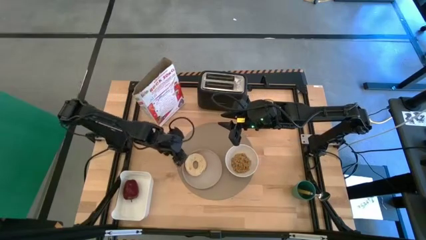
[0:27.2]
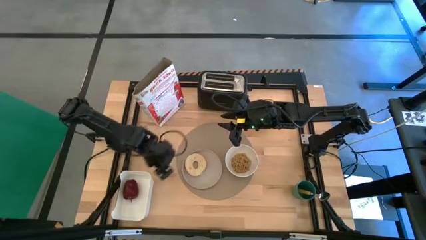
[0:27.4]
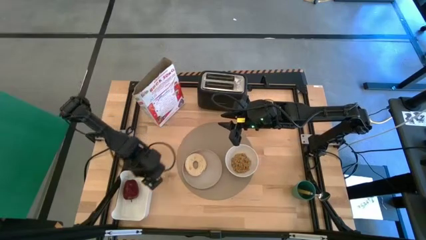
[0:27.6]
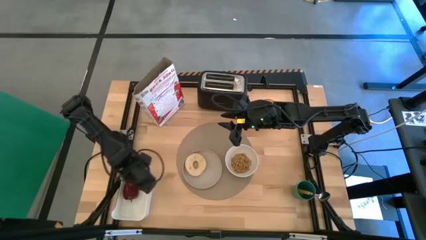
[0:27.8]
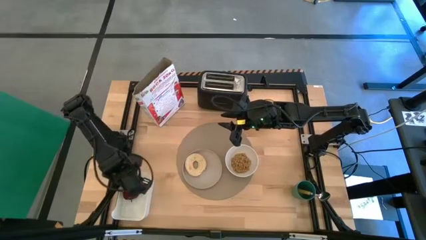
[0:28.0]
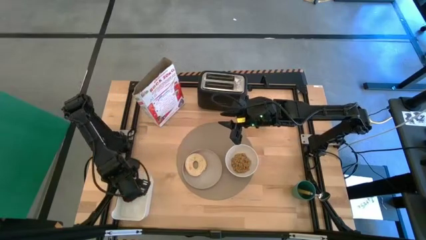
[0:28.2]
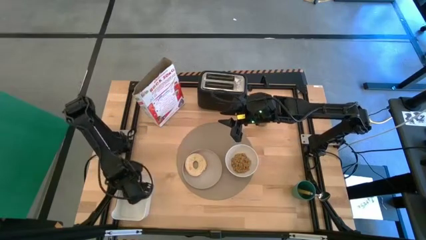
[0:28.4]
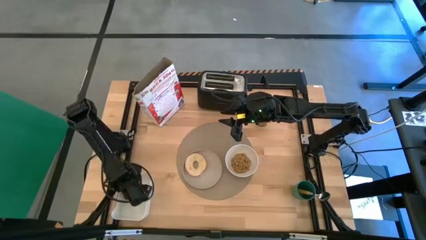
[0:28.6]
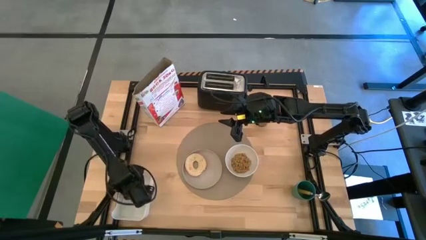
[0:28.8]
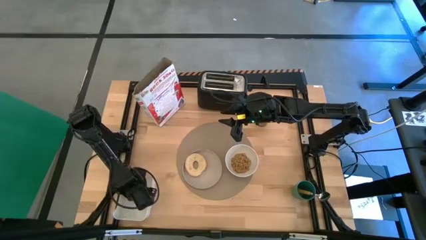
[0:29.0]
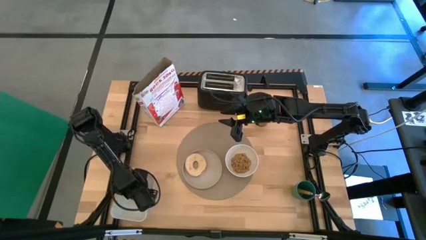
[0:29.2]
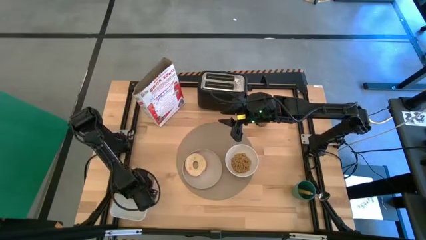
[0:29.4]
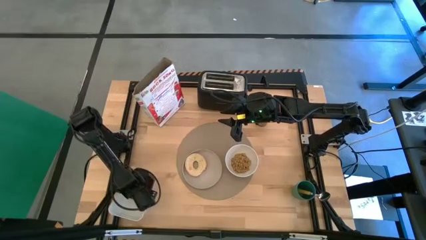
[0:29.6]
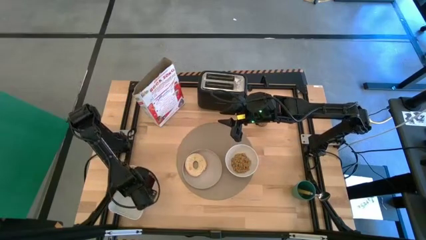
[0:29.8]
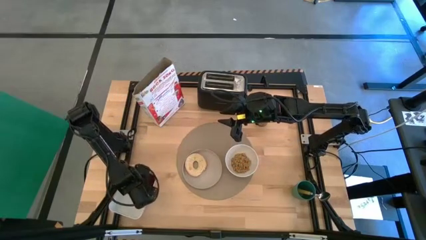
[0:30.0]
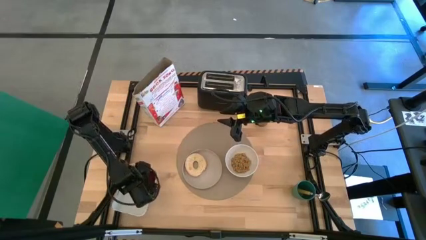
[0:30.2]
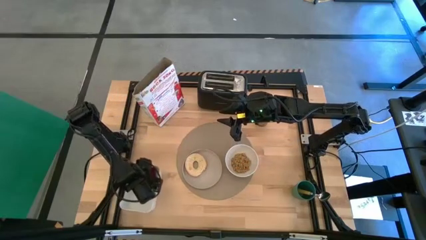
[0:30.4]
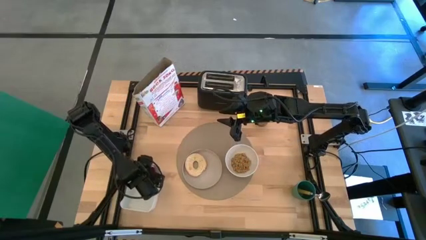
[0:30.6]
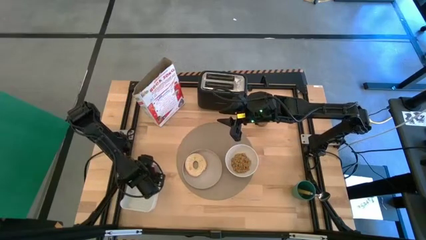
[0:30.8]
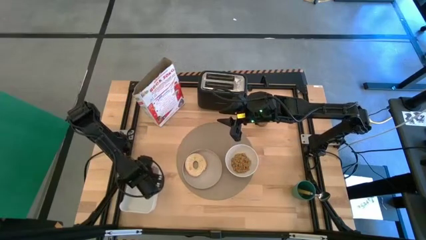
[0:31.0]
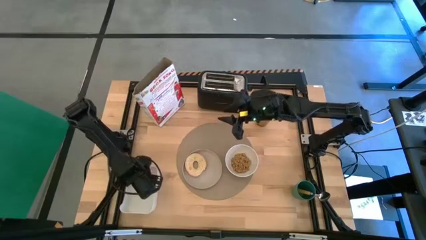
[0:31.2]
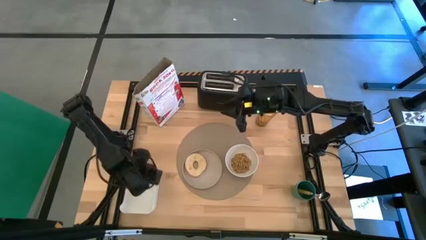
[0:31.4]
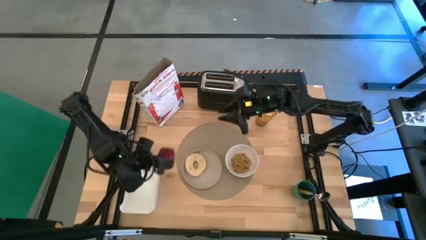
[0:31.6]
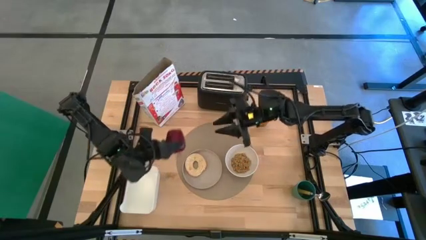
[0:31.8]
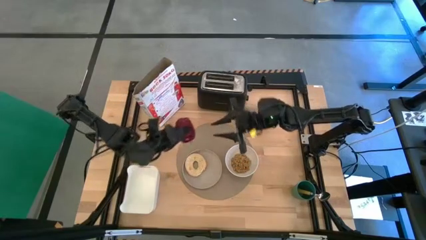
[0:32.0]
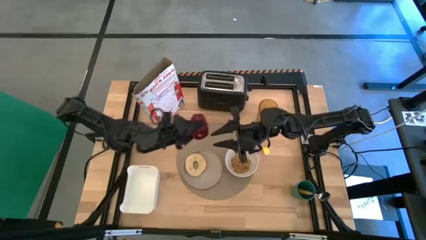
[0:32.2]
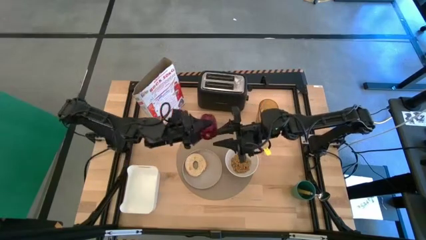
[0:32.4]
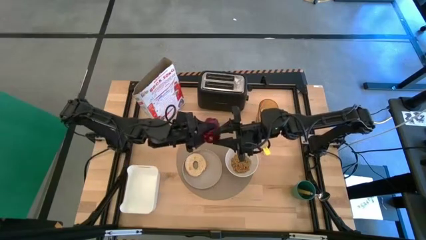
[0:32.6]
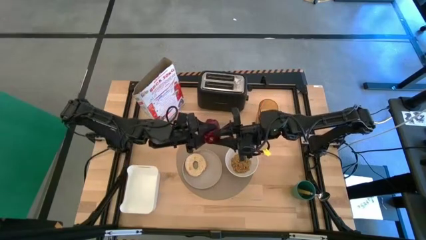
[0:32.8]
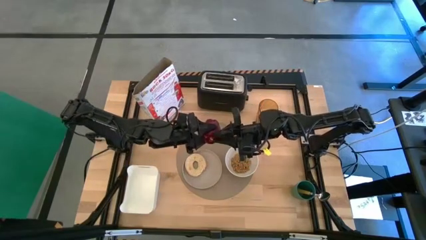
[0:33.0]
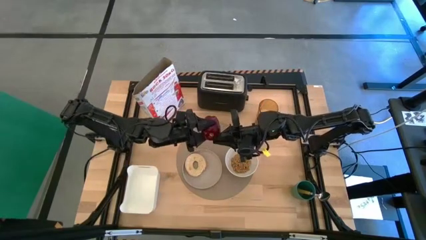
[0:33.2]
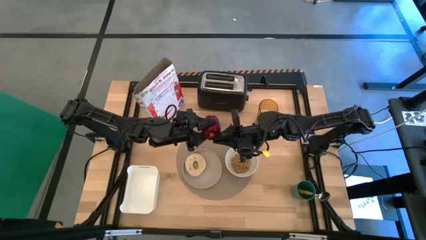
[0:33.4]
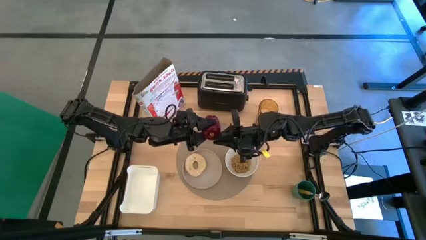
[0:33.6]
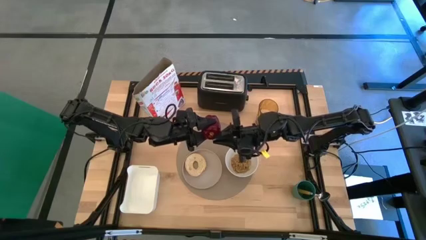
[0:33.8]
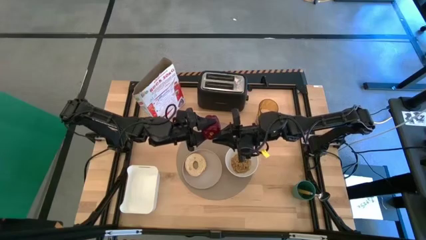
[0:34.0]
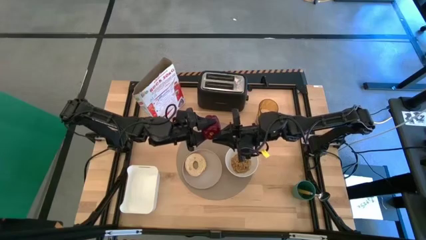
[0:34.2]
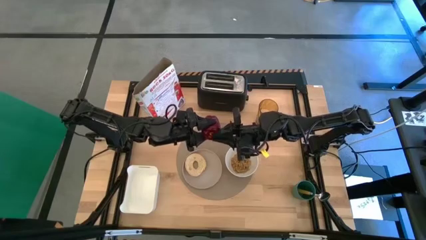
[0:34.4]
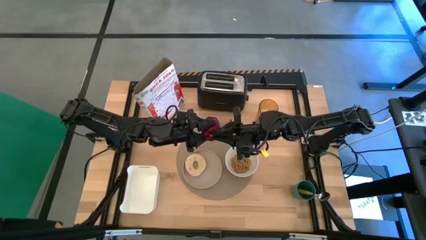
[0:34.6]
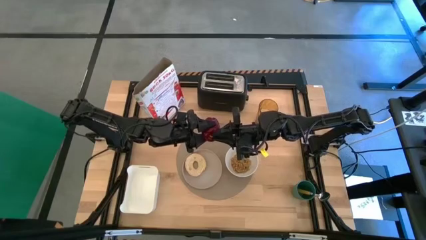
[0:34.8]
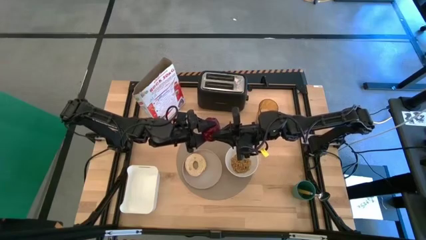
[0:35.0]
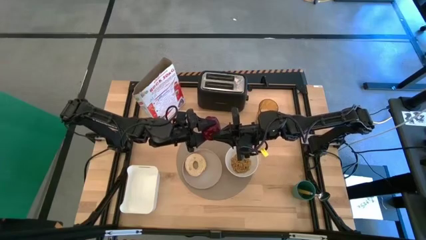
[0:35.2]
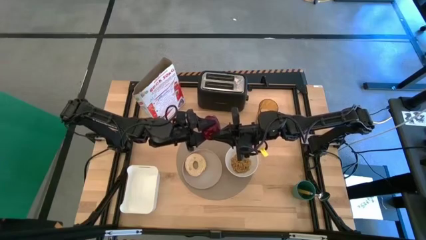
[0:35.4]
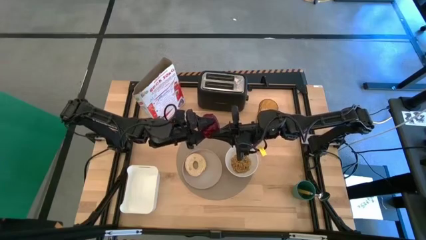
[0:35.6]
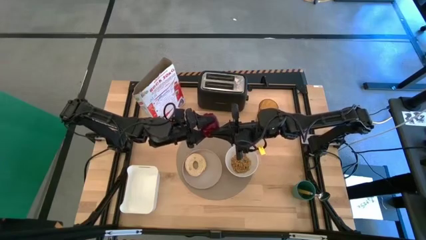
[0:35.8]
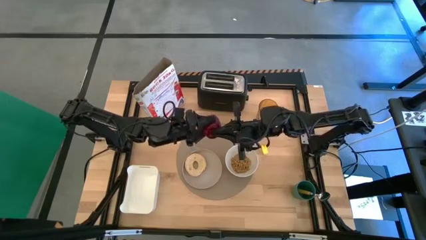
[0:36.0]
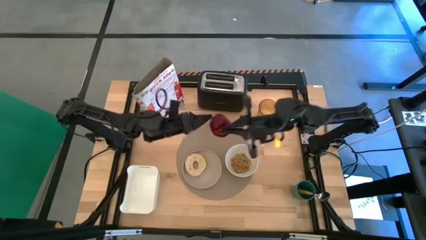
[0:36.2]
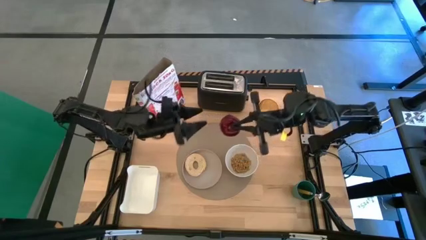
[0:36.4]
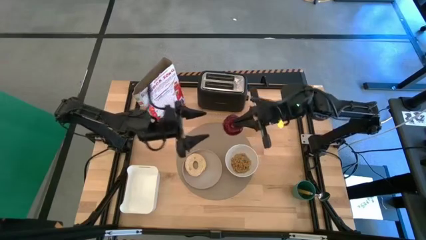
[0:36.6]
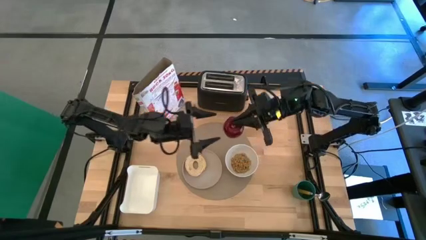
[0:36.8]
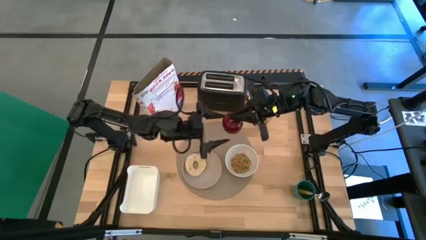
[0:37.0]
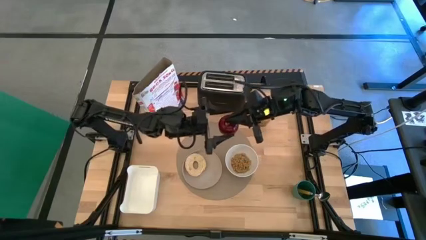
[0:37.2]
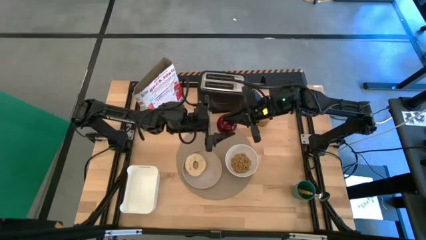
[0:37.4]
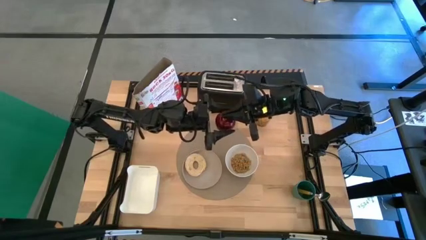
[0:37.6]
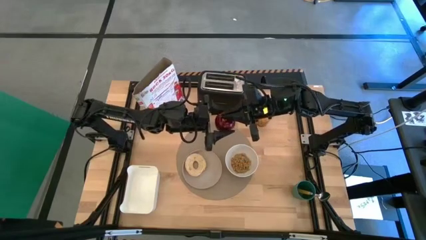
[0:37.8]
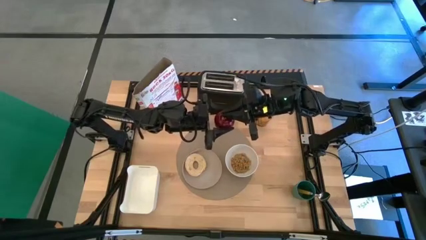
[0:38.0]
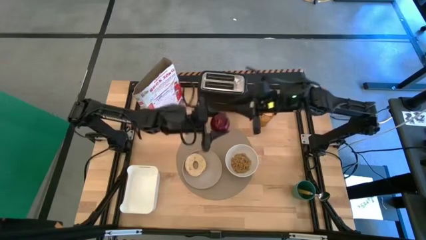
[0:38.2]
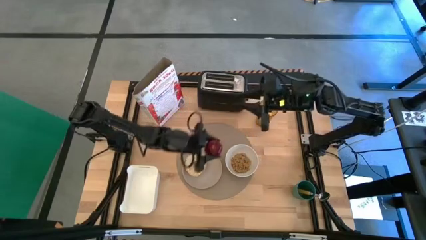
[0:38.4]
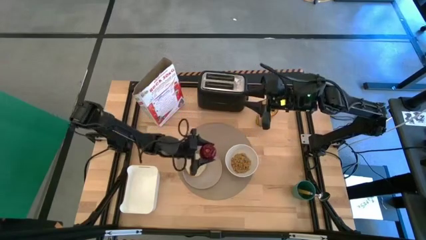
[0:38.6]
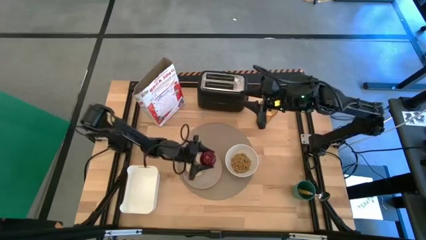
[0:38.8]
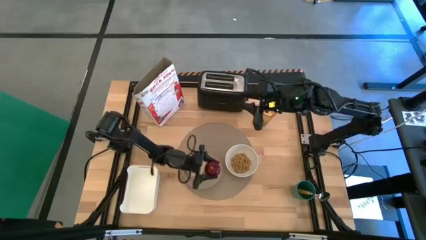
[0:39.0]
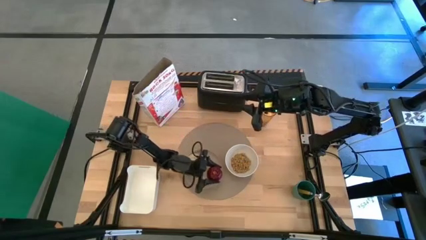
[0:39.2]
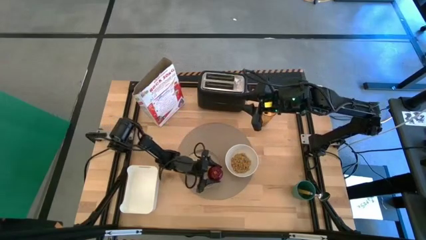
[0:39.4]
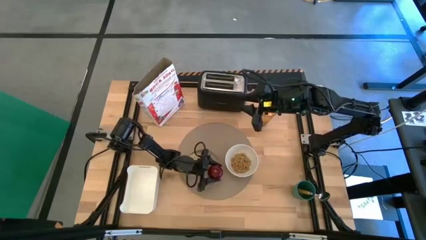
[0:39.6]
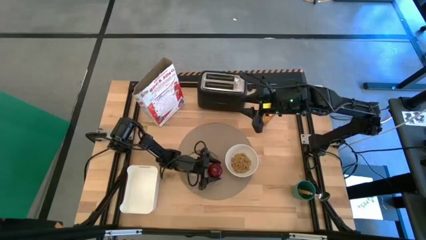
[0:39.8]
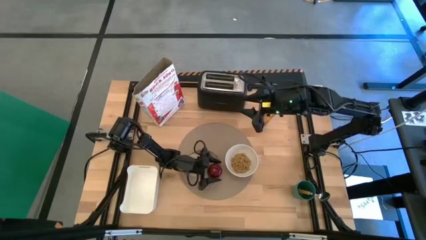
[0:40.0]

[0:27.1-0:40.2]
Task: Arrange a breakfast setting
Put the apple from the white bin on the gray plate
